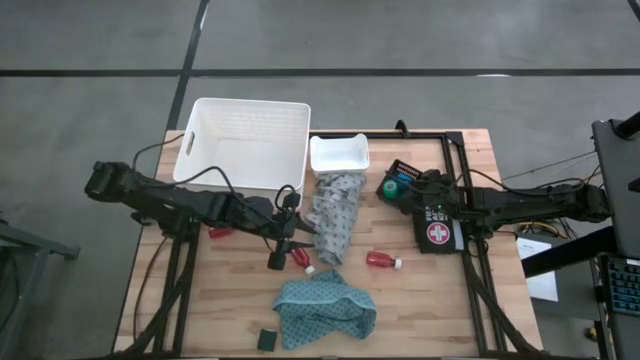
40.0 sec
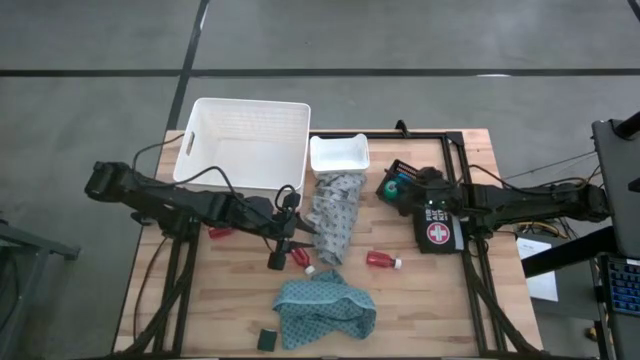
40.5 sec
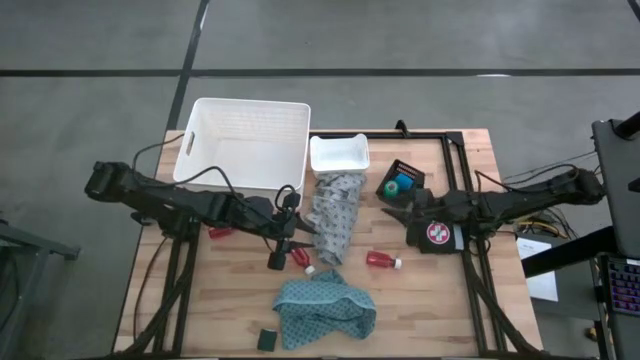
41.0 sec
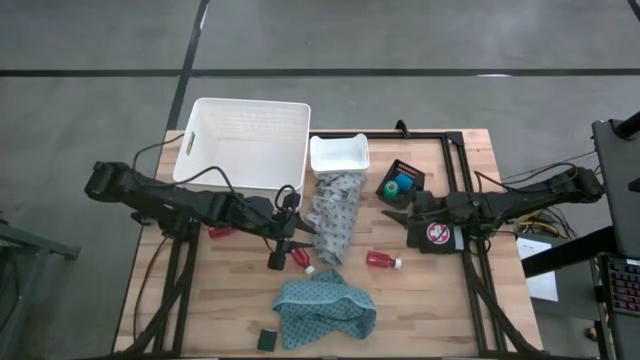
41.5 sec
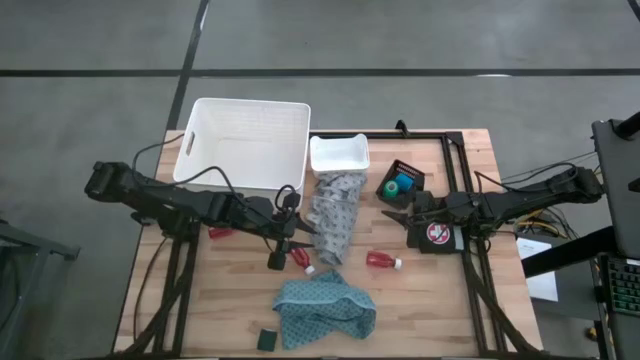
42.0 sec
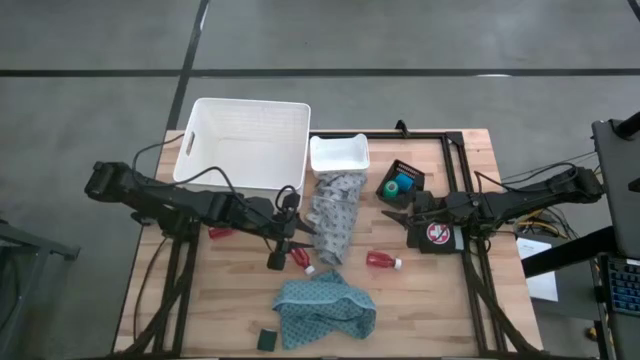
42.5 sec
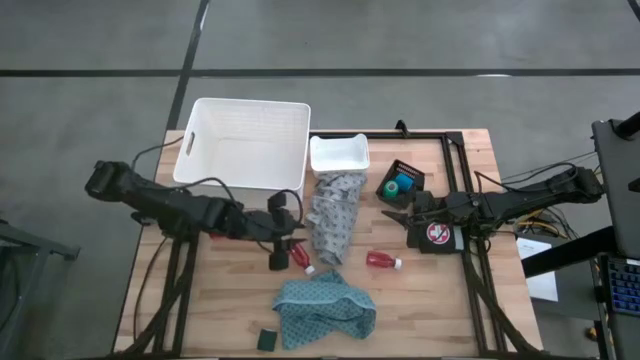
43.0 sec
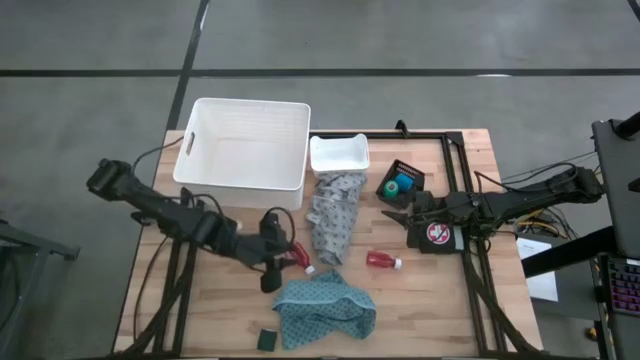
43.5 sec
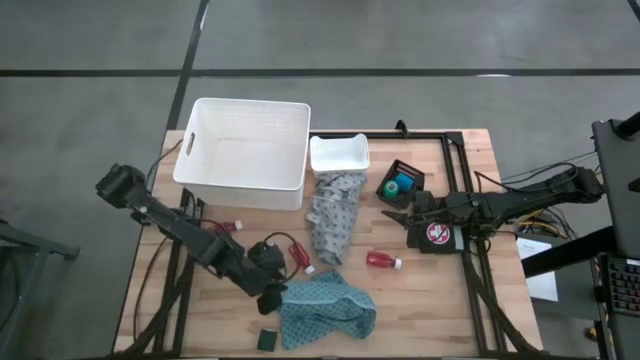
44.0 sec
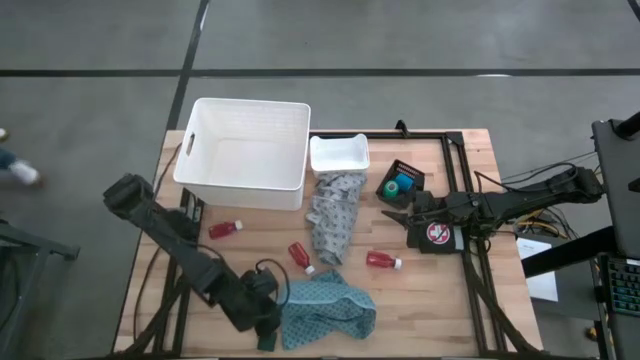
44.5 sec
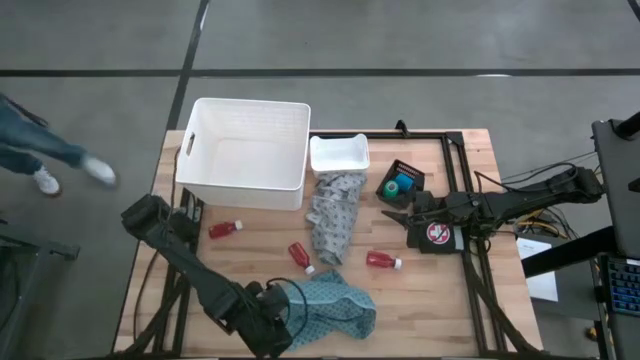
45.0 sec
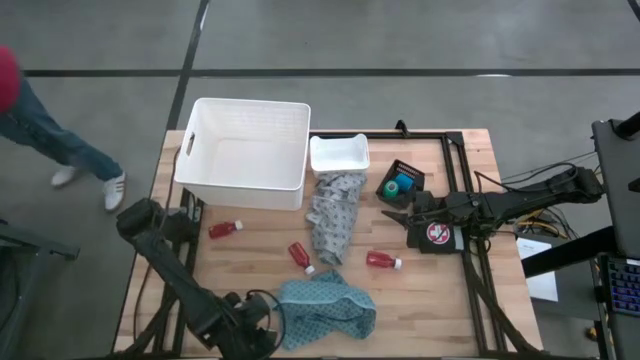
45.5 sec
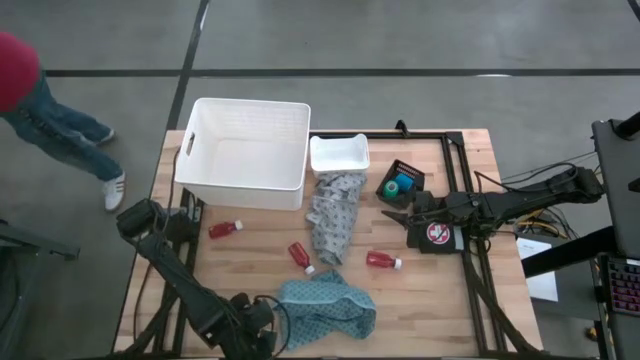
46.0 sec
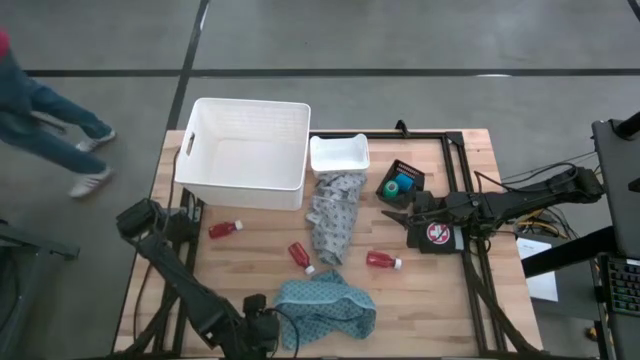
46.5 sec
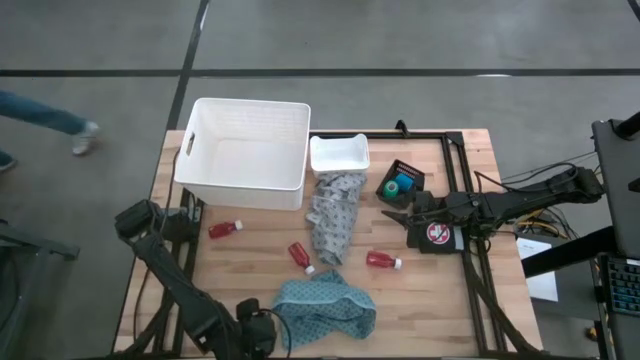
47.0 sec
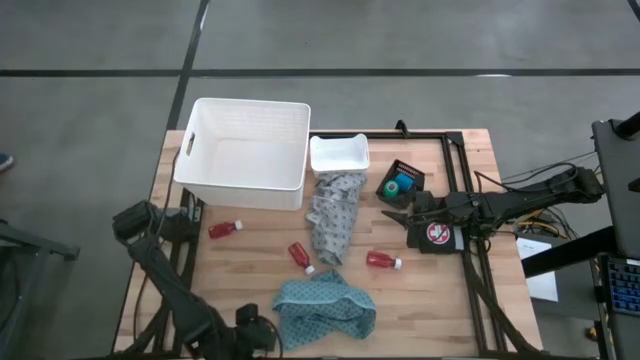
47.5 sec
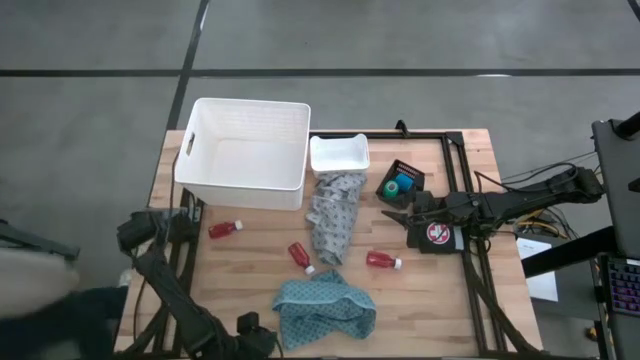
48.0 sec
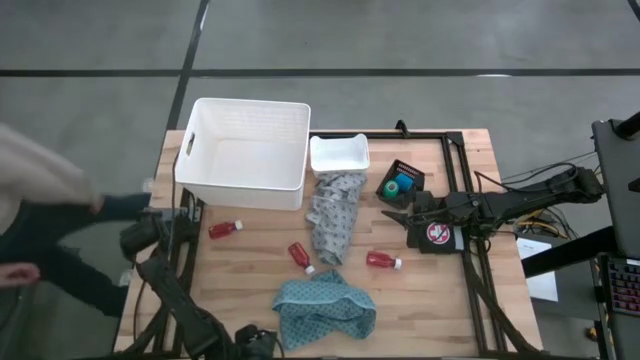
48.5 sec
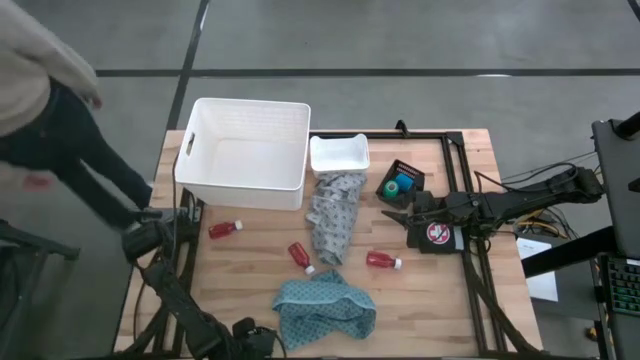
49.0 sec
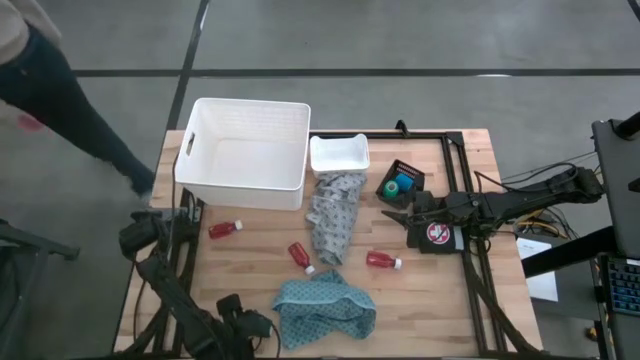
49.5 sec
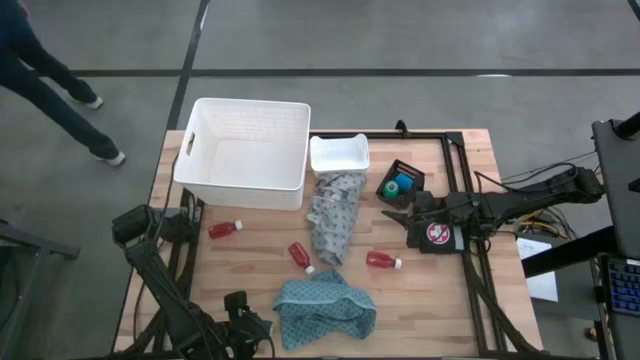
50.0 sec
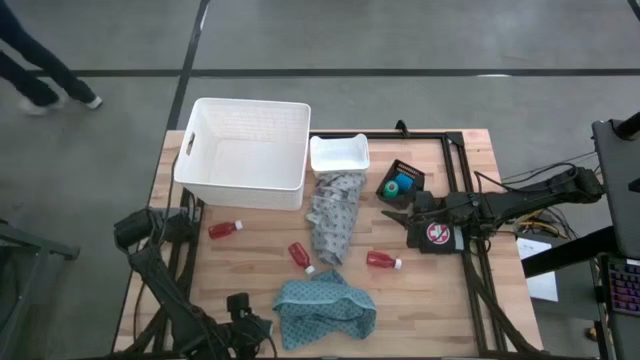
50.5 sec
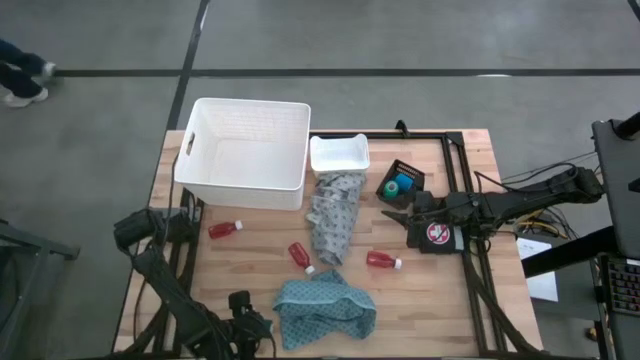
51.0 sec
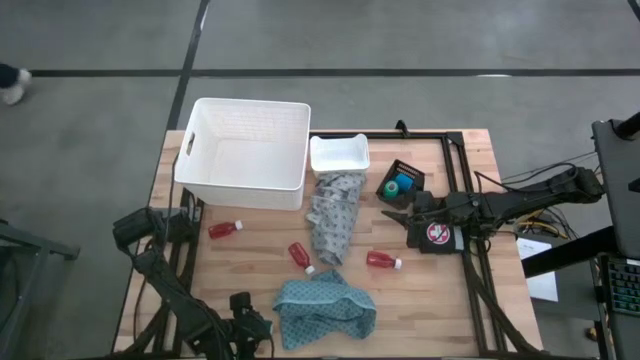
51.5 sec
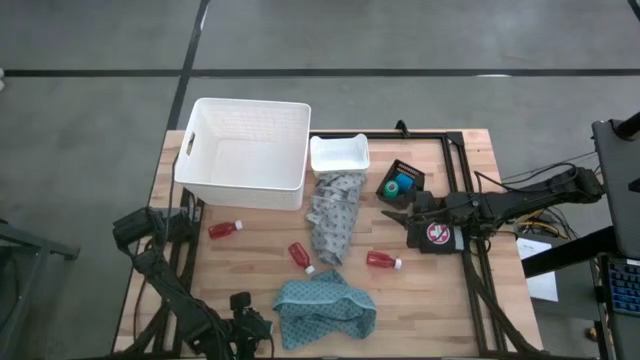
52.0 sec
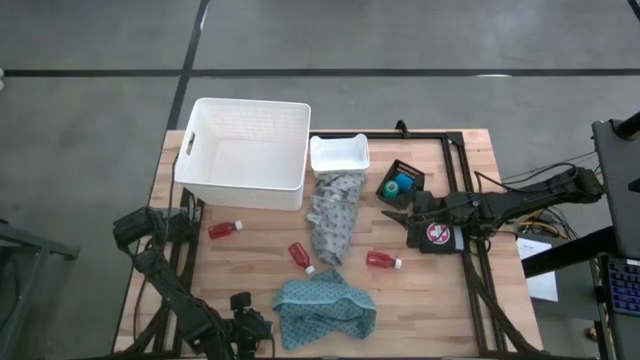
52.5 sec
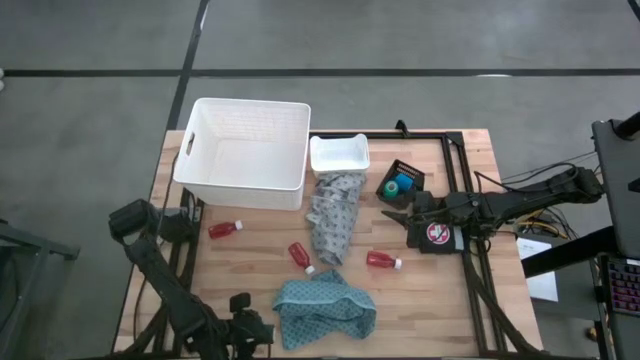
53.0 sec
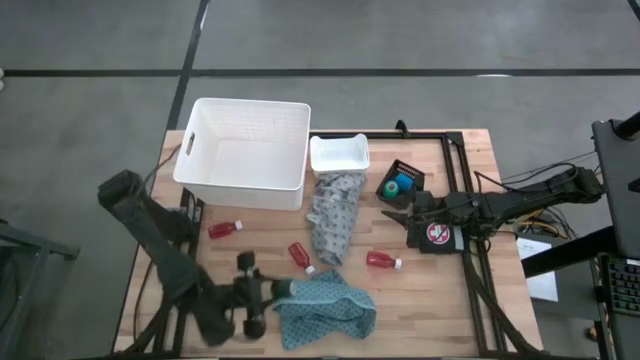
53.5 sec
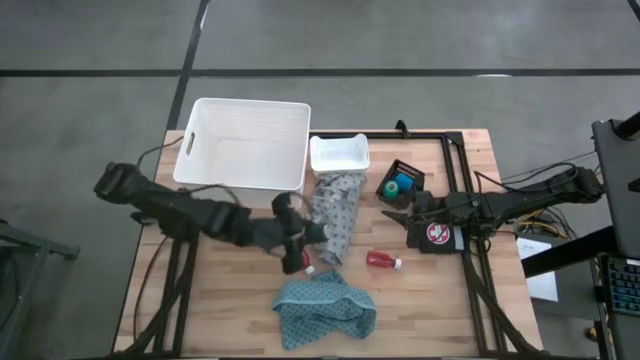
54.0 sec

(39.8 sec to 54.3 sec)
Task: Pick & Place Medicine items
Put the green bandage into the black bin

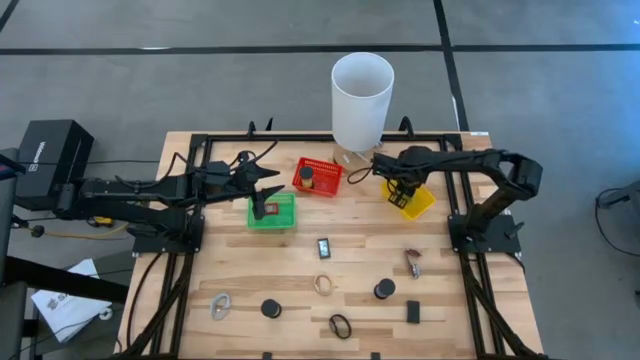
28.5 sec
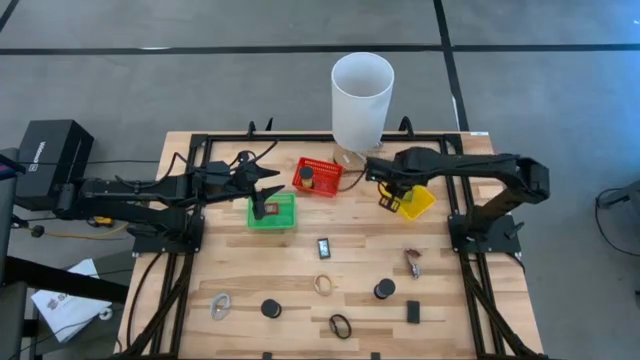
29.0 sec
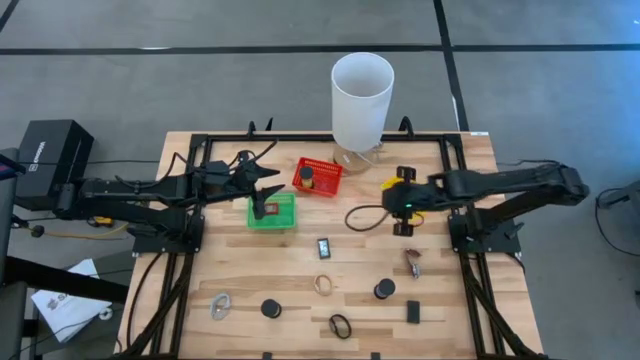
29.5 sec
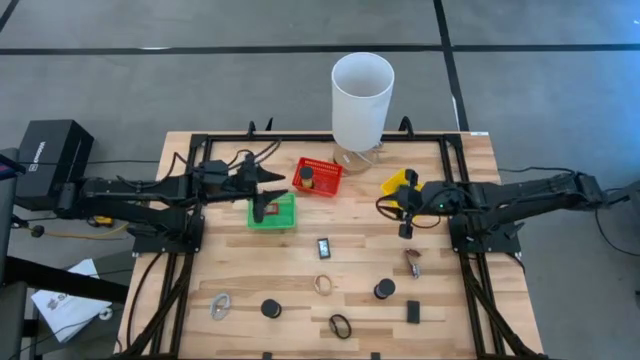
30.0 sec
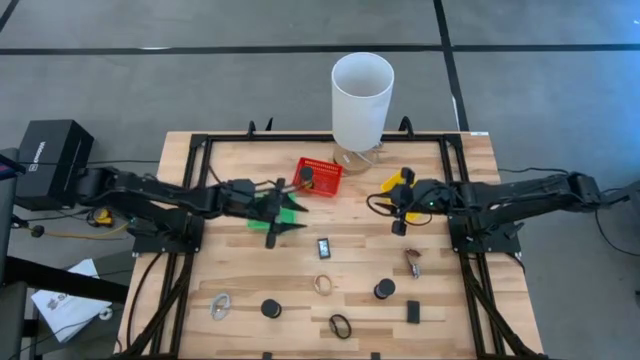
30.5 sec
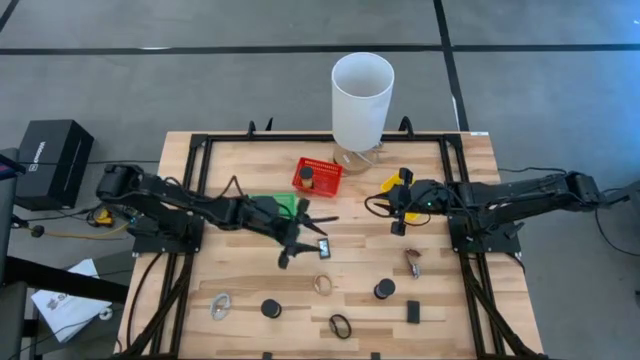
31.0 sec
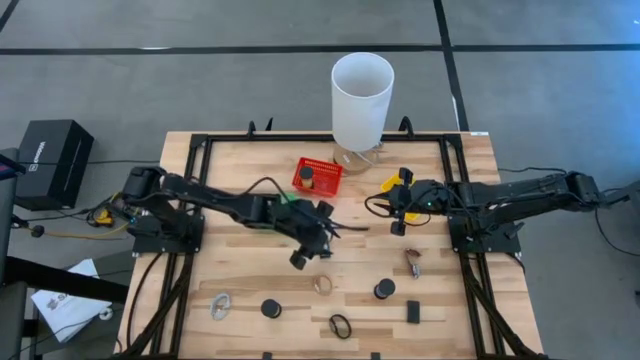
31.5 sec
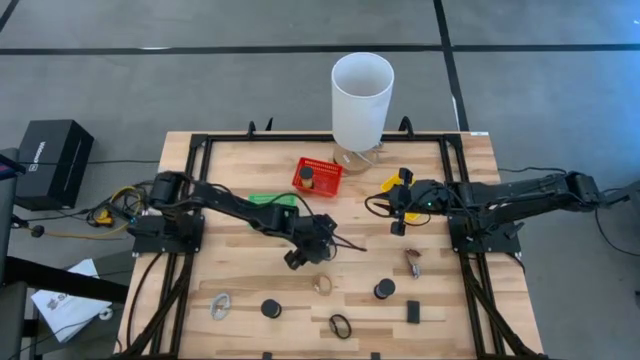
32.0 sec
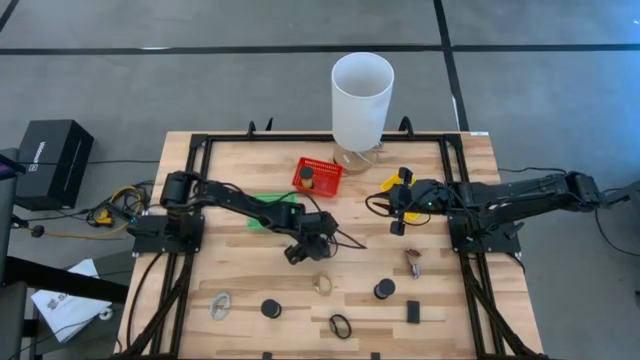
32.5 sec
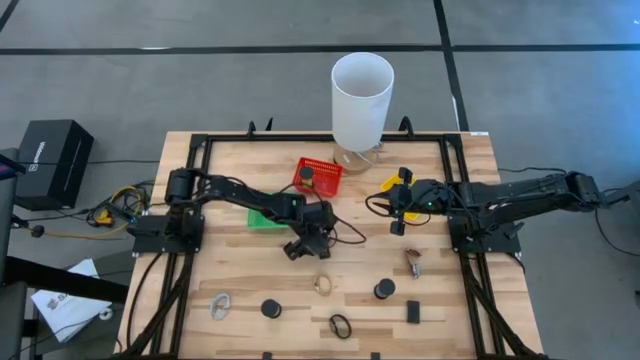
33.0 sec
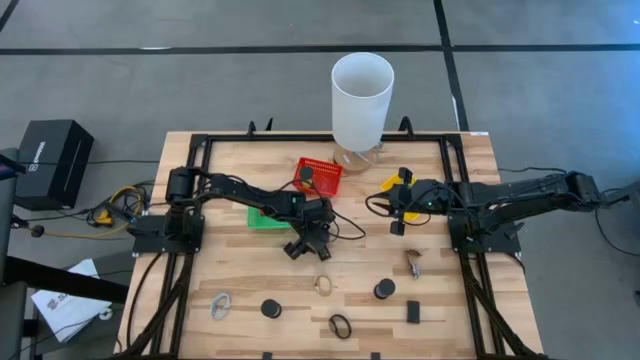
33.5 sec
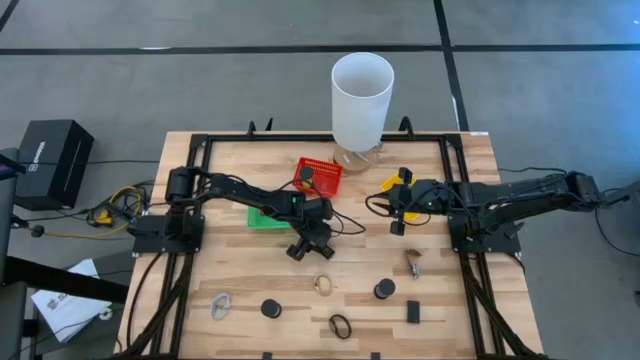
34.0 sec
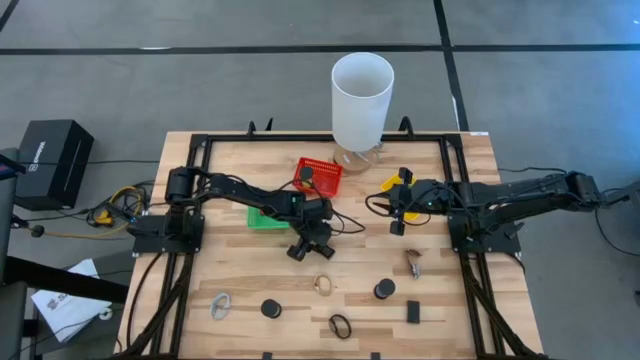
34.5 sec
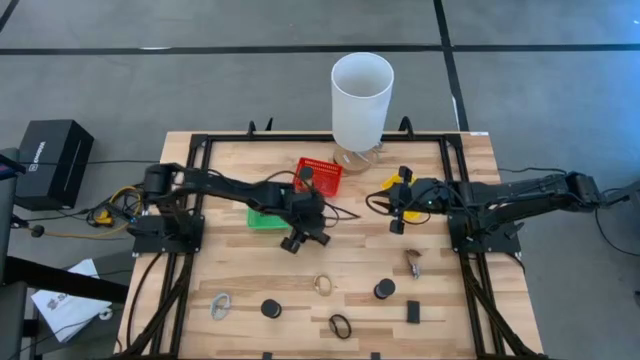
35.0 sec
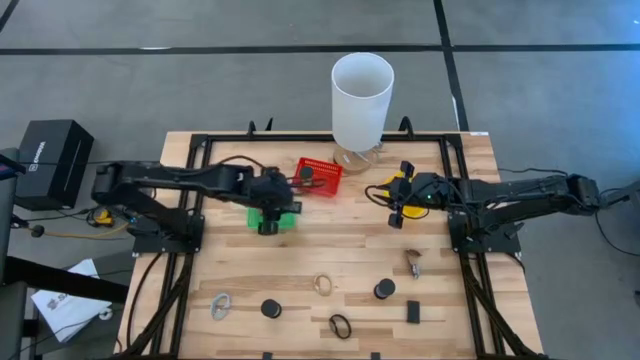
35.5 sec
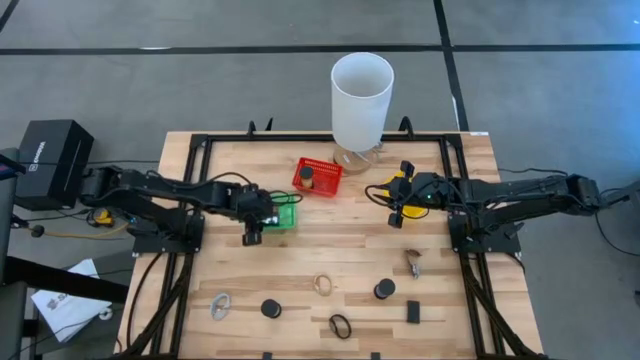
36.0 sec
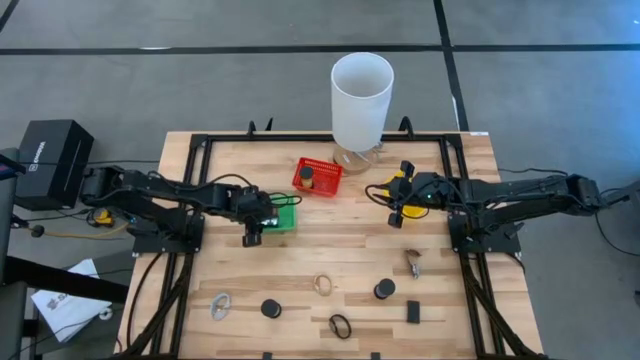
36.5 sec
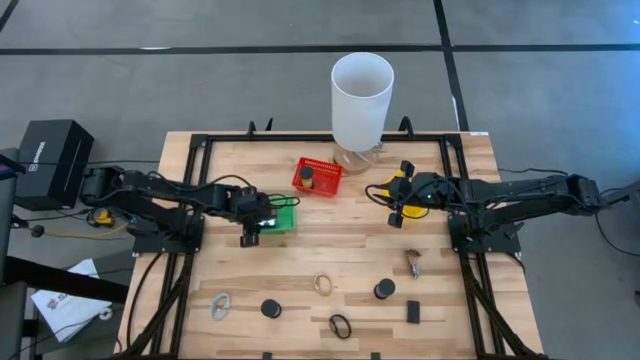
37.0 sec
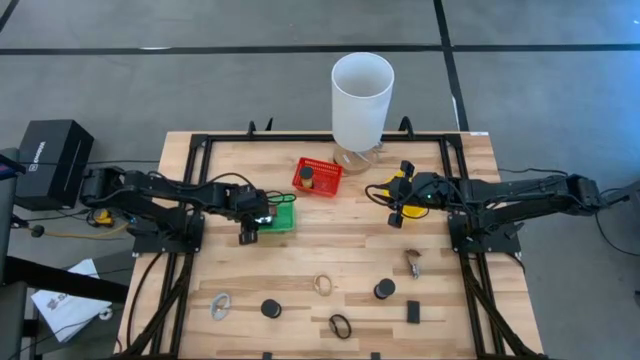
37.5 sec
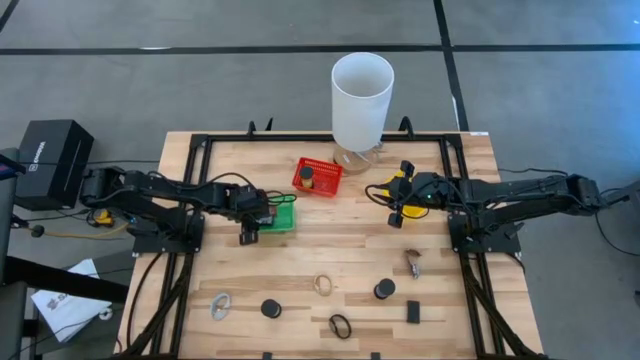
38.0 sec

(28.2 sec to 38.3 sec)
Task: Pick & Place Office items
Put the top black digital timer into the green bin
